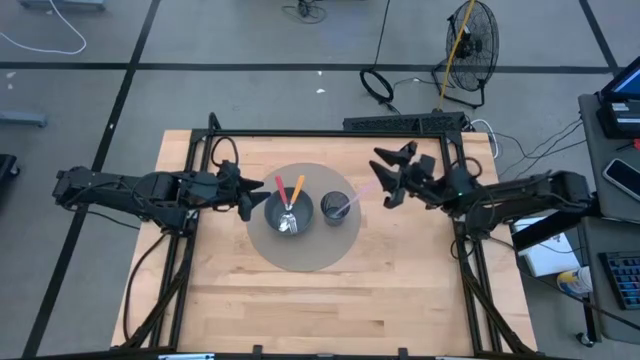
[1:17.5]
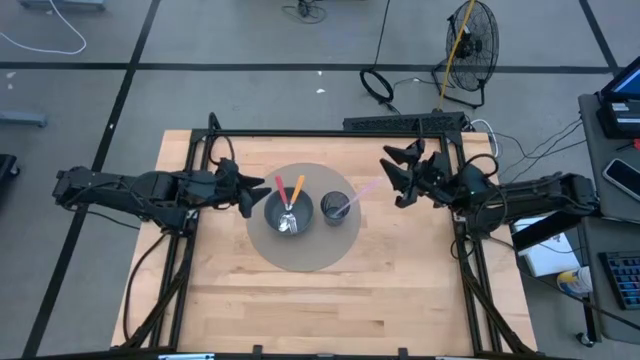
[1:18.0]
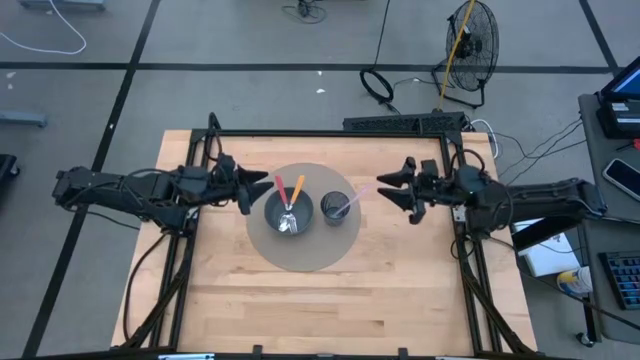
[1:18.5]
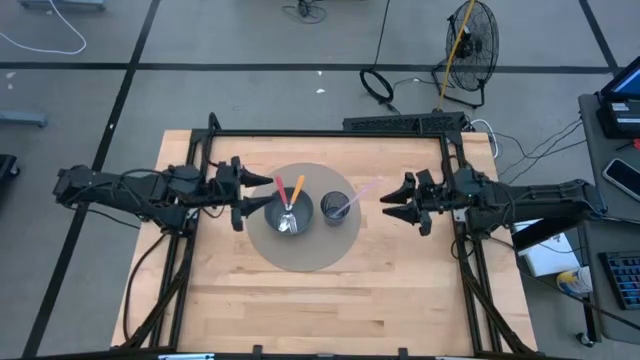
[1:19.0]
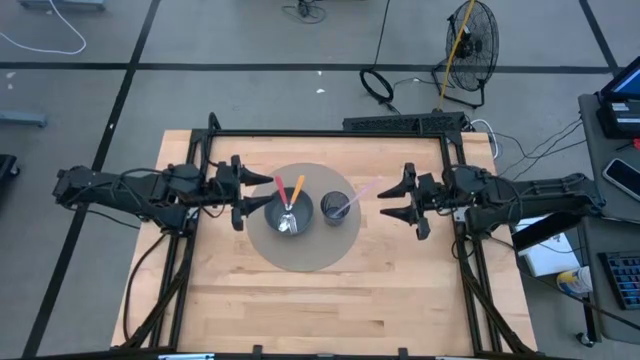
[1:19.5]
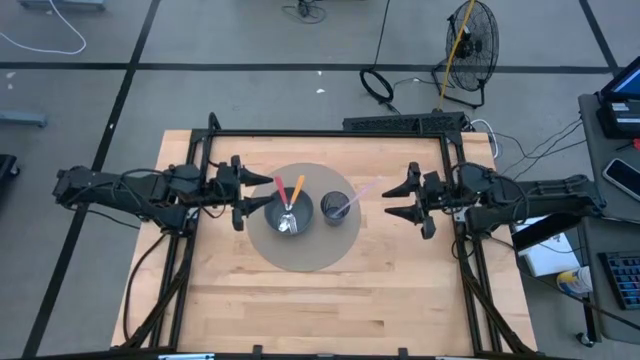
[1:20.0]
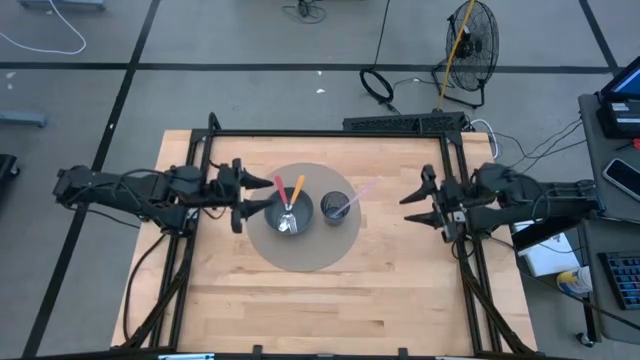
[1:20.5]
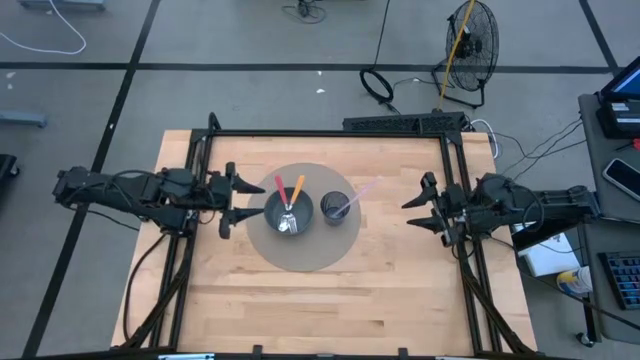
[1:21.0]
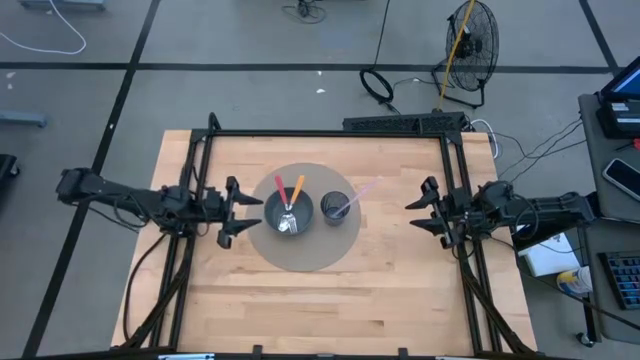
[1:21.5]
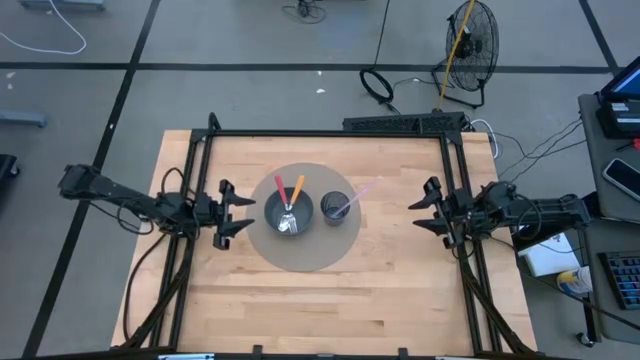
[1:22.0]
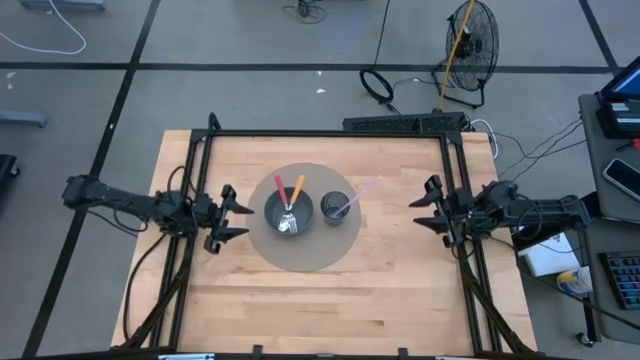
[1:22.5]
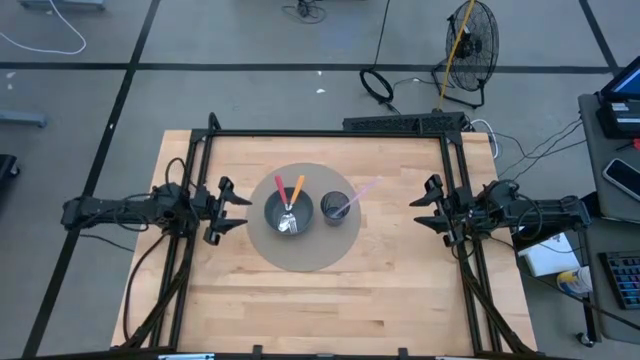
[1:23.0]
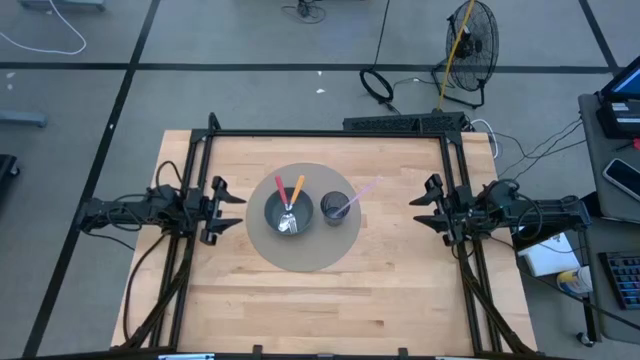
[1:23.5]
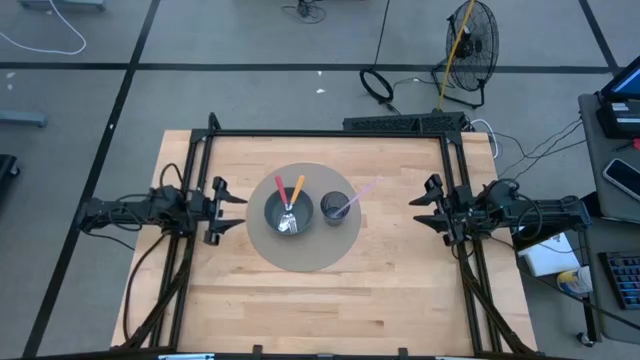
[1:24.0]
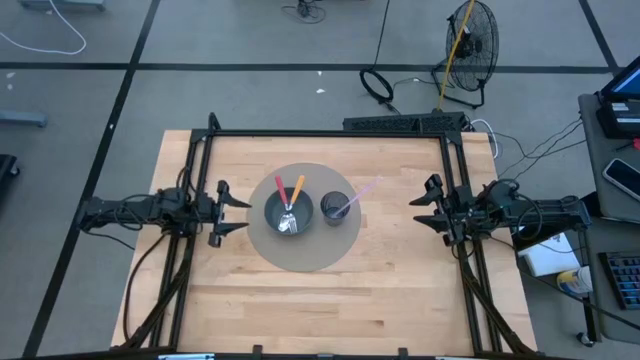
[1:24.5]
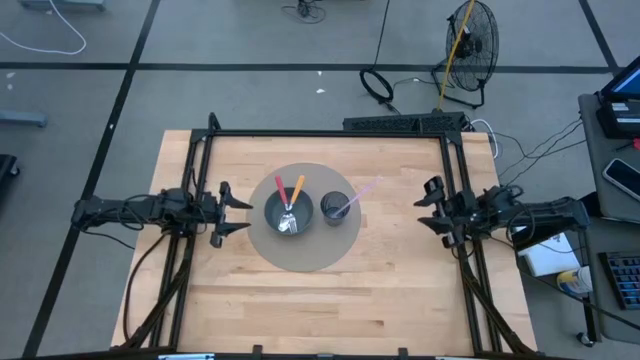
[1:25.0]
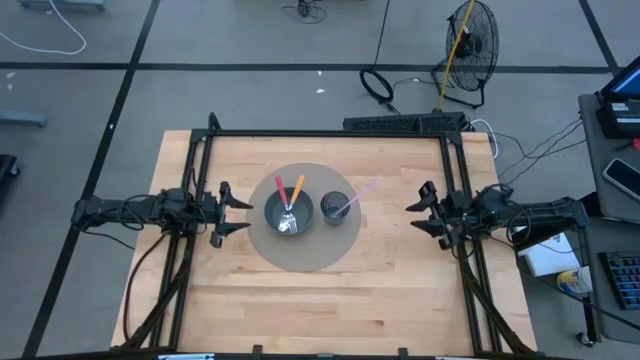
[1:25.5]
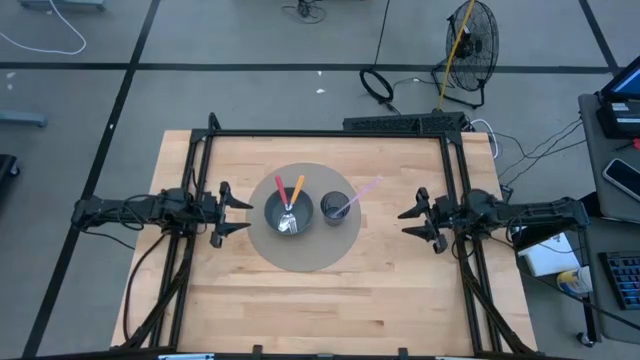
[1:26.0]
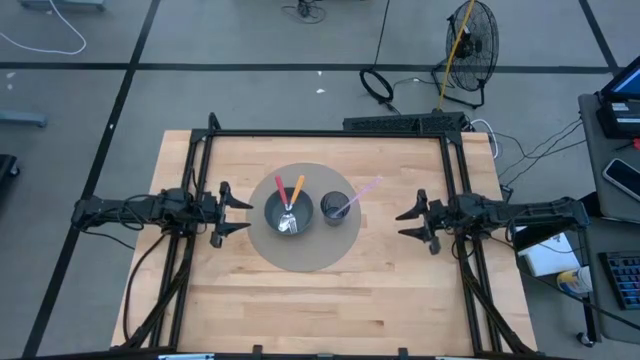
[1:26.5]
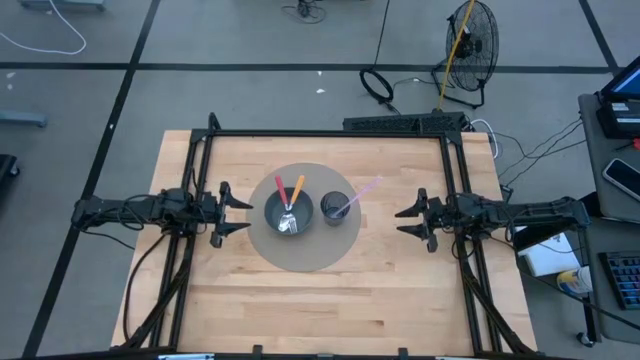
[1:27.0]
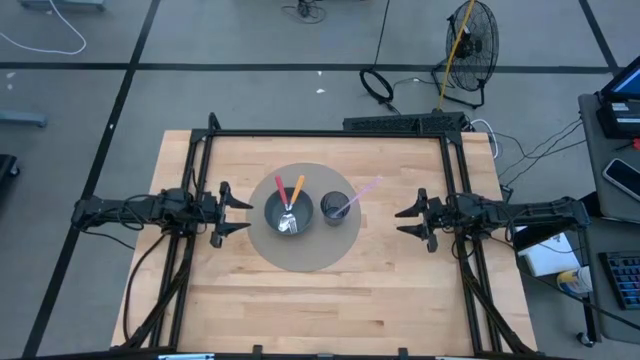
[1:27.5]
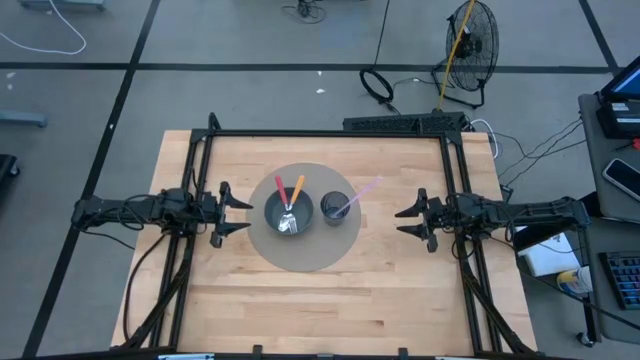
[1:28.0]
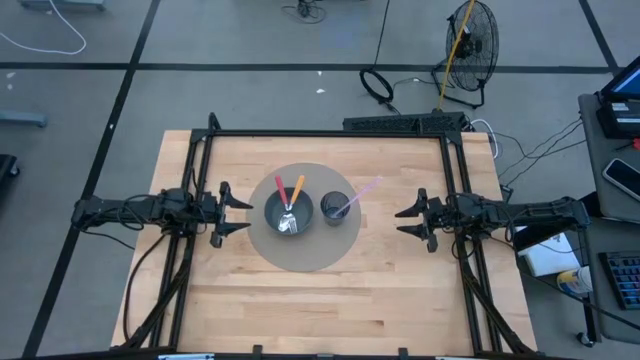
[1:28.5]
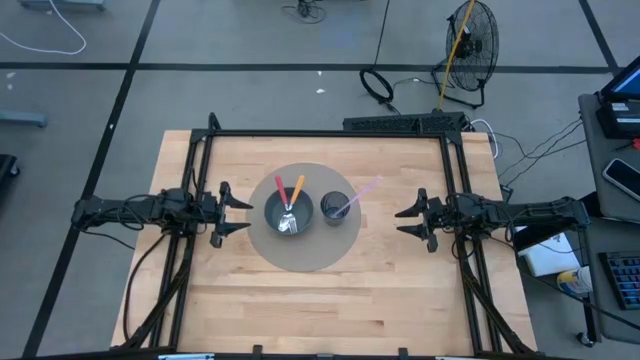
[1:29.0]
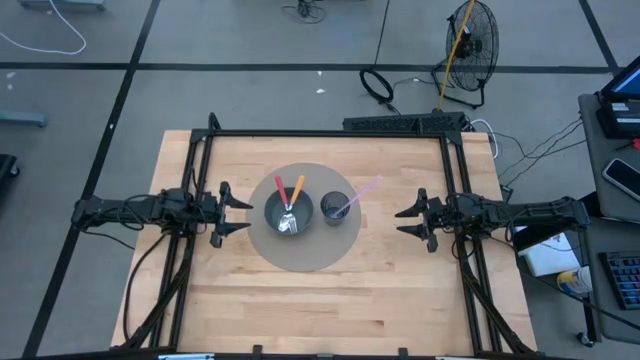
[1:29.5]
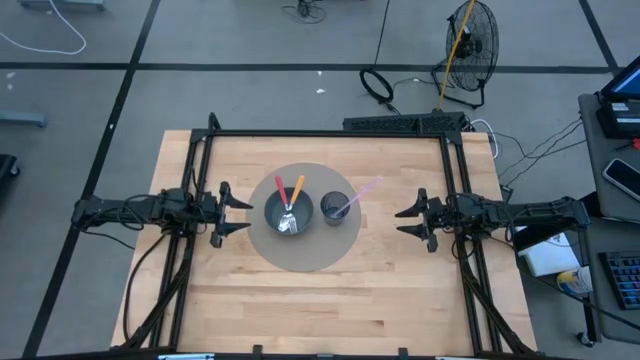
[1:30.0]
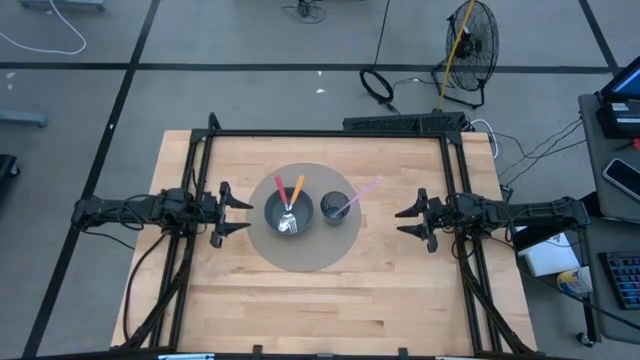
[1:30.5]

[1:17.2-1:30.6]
Task: Pick & Place Utensil
Return to Home Position

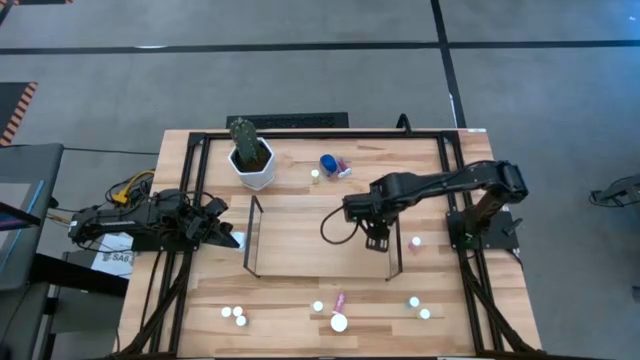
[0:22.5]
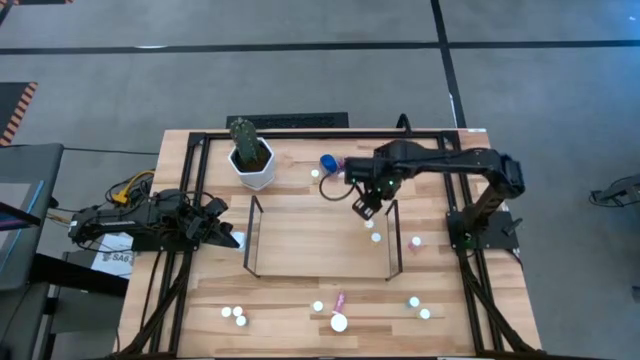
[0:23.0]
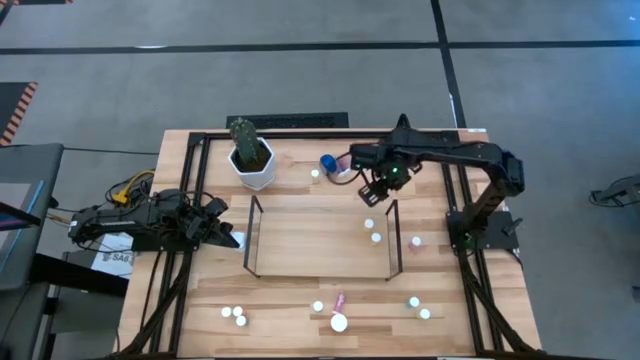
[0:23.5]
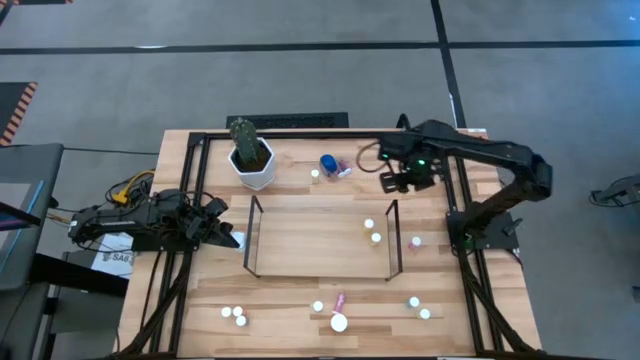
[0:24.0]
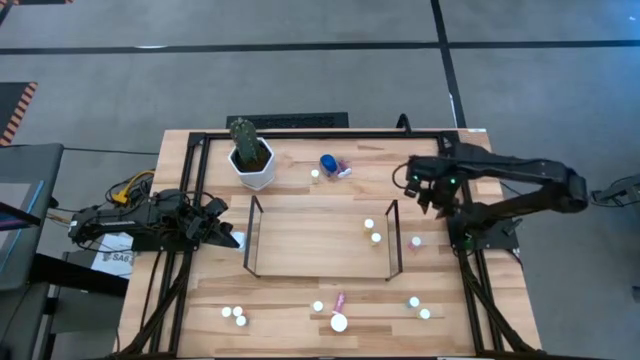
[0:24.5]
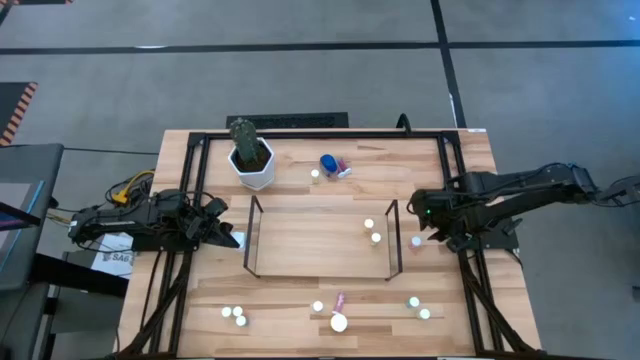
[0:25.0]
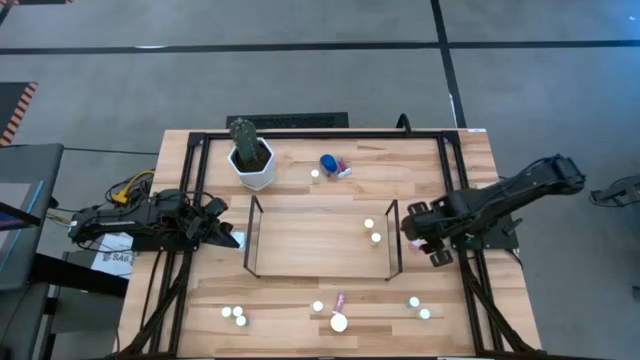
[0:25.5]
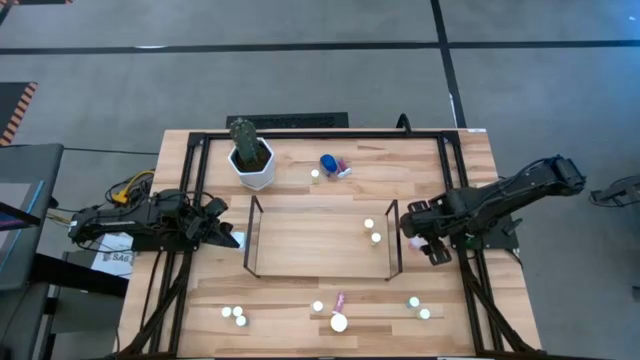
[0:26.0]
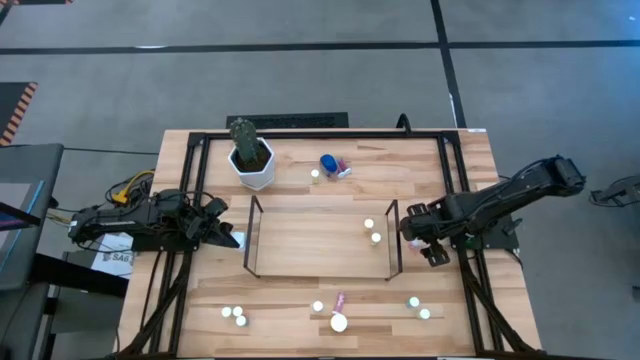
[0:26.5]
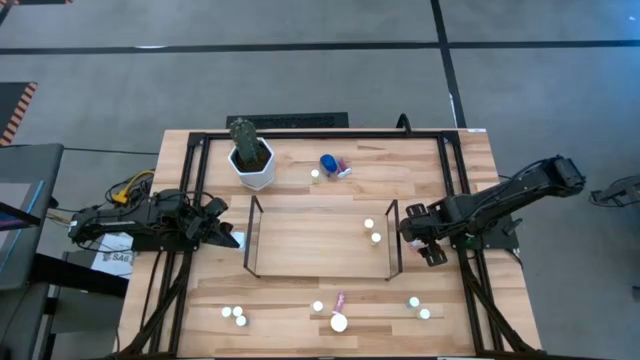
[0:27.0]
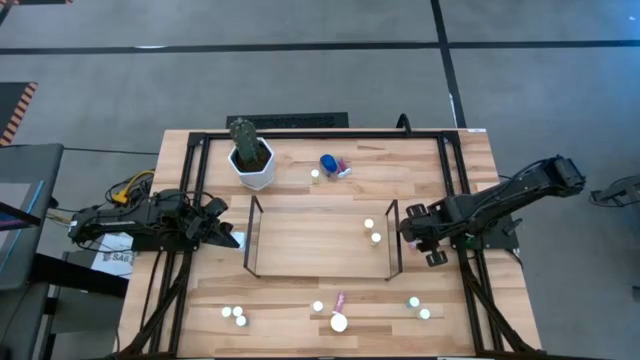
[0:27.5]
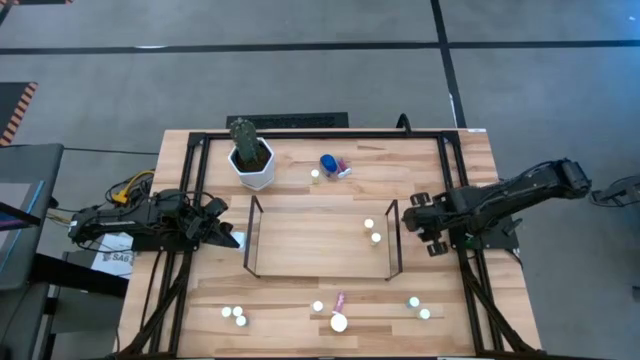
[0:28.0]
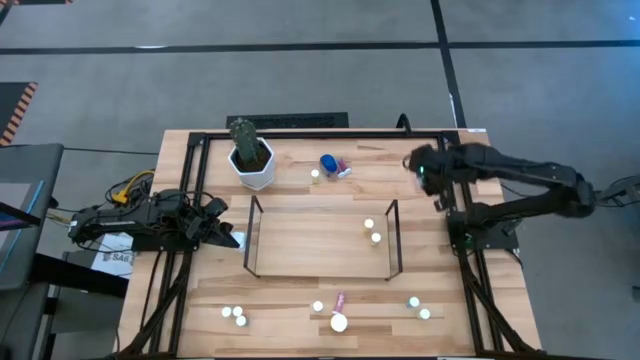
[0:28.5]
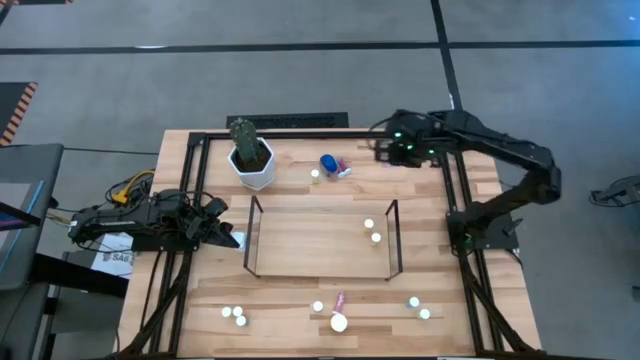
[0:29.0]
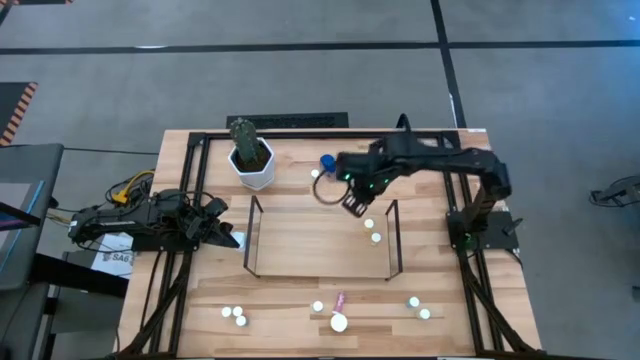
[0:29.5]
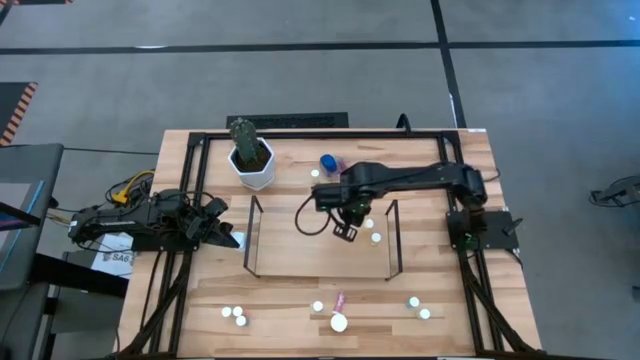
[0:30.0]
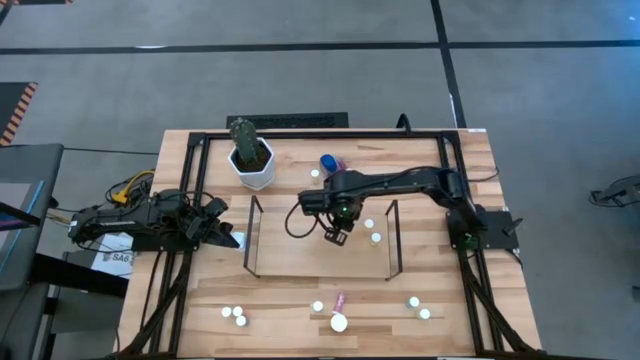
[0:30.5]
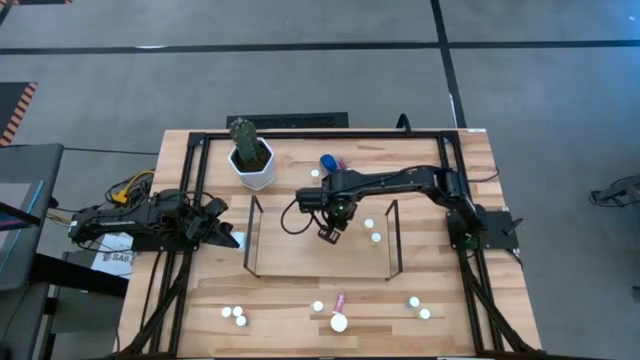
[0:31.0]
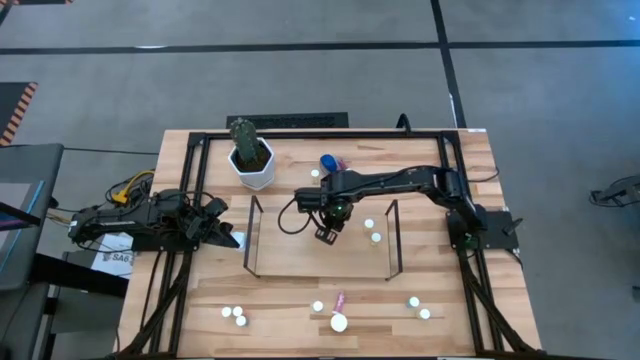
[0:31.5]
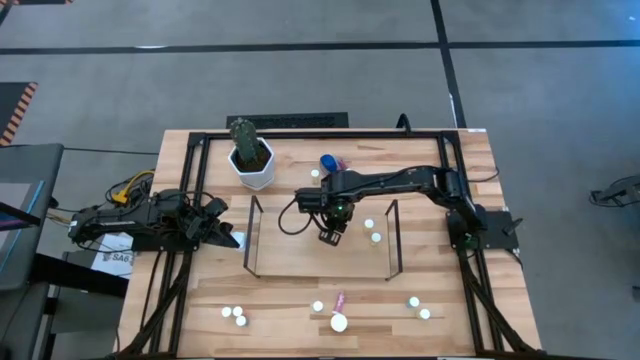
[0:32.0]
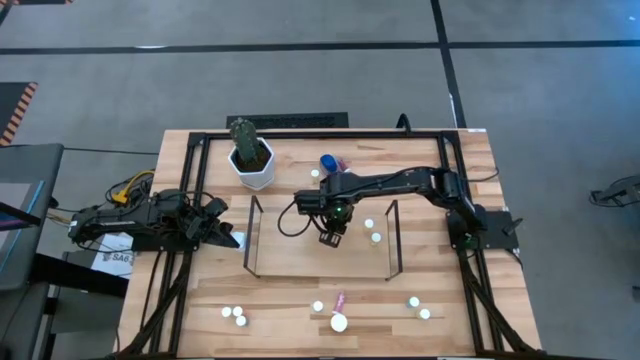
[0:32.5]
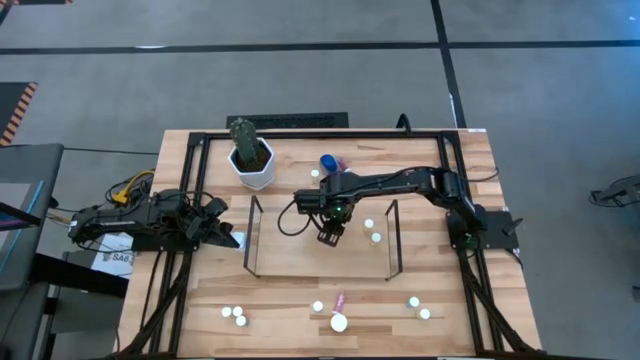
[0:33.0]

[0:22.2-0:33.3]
Task: Pick and place medicine bottles onto shelf by color
Put the pink pill bottle on the shelf
